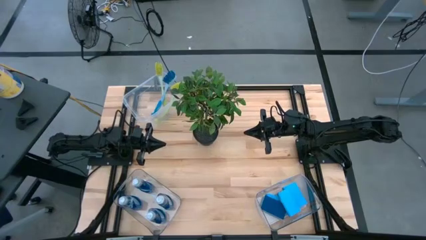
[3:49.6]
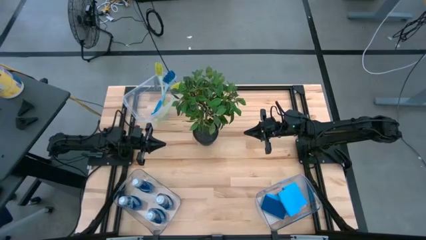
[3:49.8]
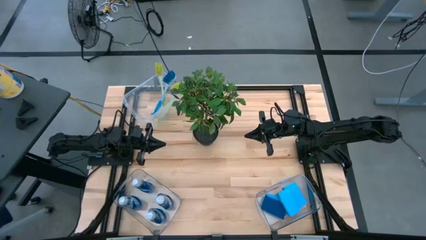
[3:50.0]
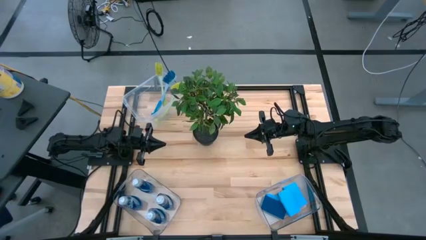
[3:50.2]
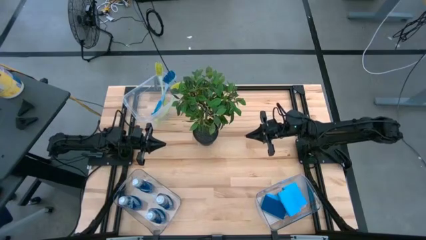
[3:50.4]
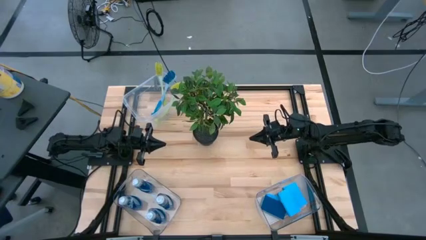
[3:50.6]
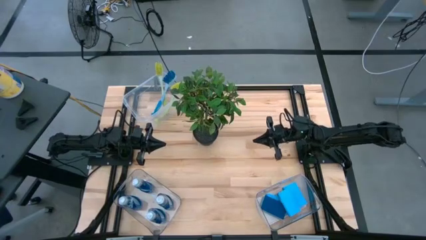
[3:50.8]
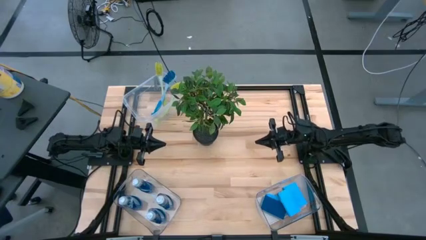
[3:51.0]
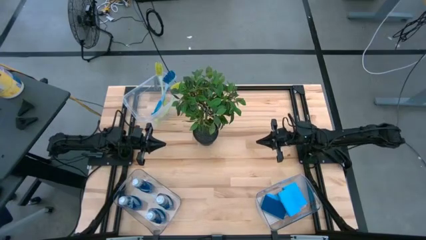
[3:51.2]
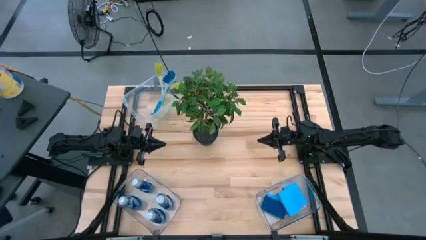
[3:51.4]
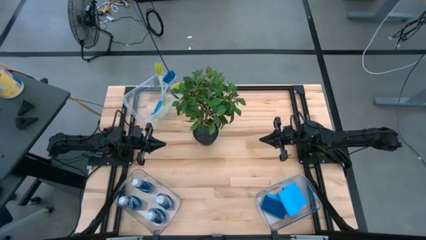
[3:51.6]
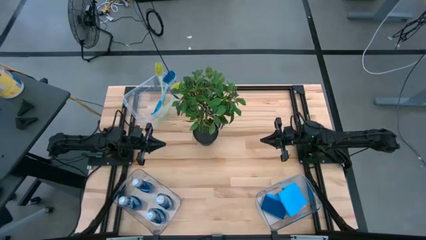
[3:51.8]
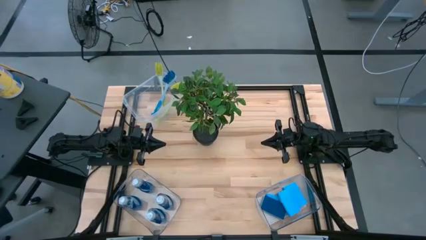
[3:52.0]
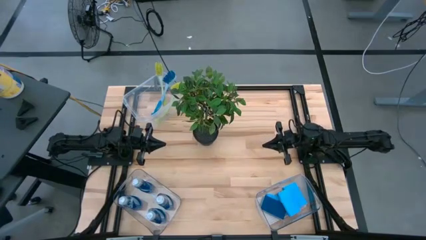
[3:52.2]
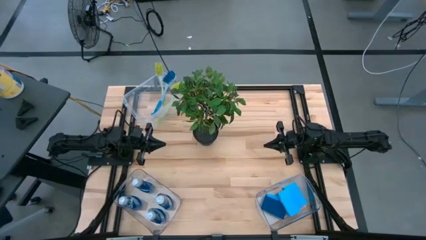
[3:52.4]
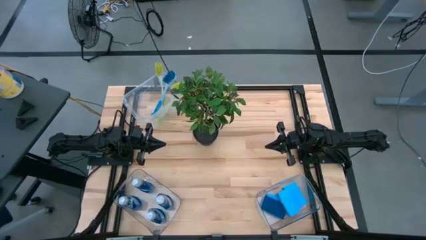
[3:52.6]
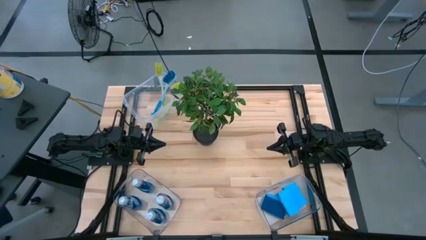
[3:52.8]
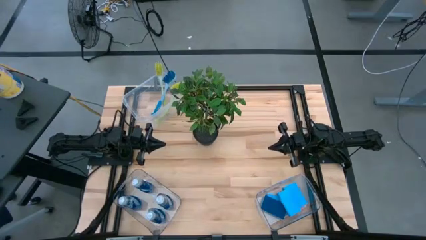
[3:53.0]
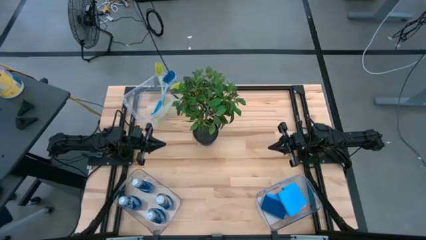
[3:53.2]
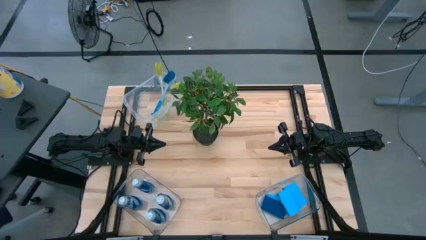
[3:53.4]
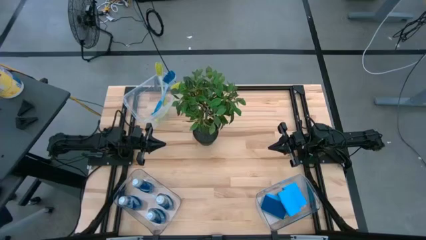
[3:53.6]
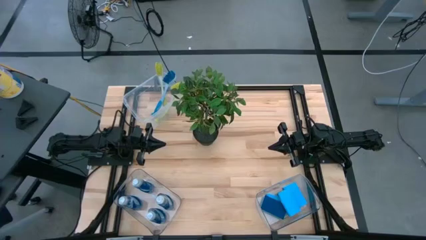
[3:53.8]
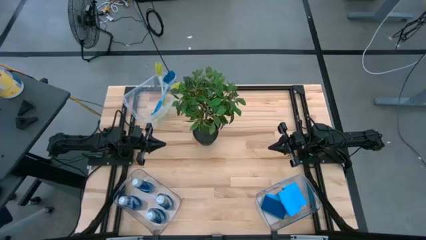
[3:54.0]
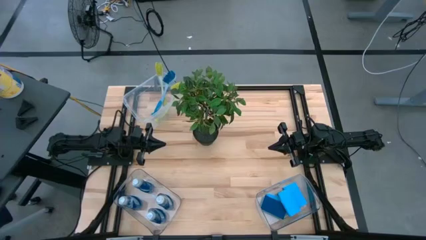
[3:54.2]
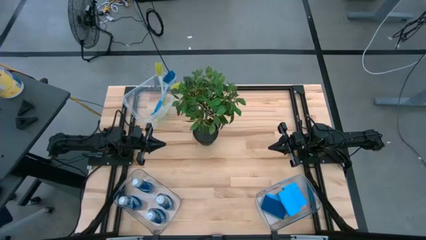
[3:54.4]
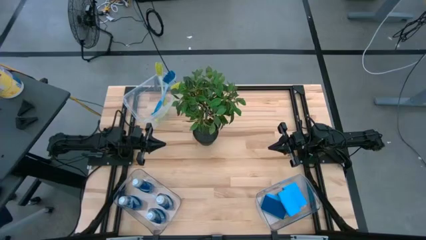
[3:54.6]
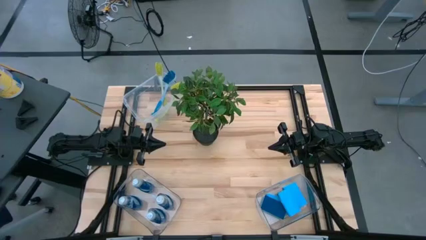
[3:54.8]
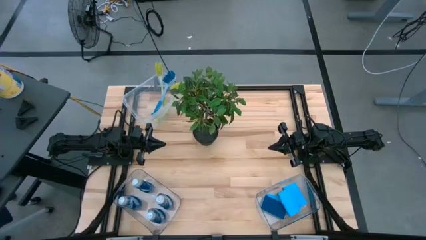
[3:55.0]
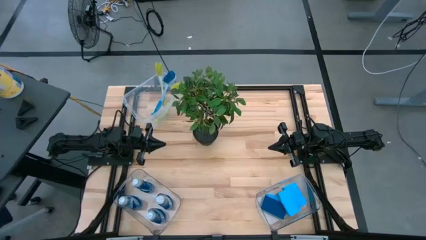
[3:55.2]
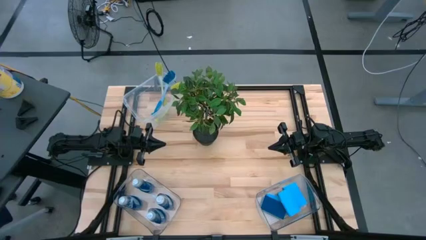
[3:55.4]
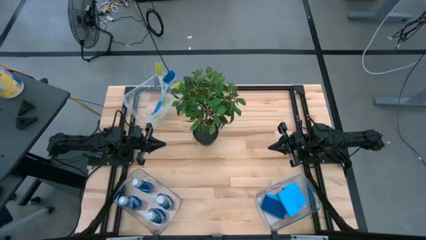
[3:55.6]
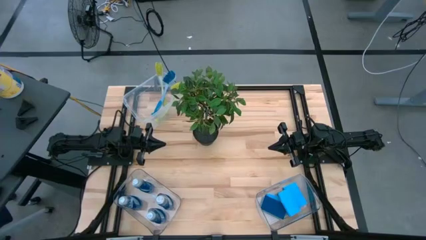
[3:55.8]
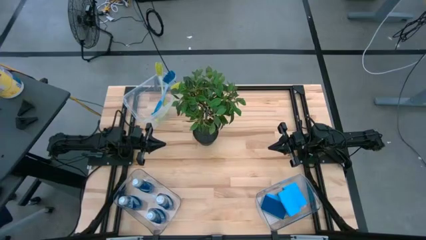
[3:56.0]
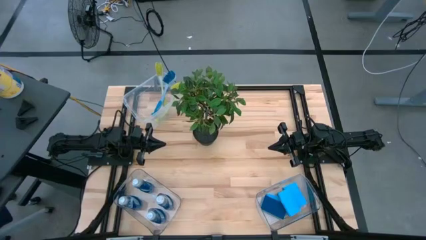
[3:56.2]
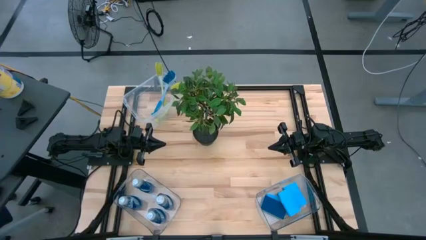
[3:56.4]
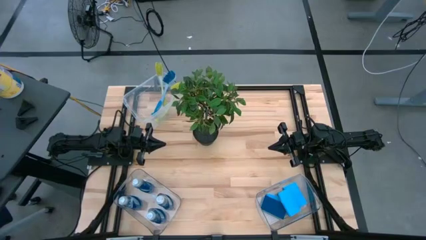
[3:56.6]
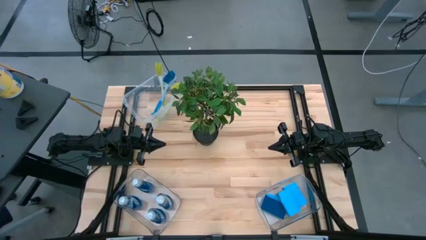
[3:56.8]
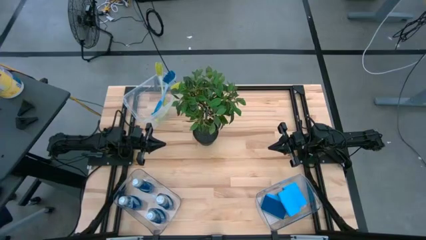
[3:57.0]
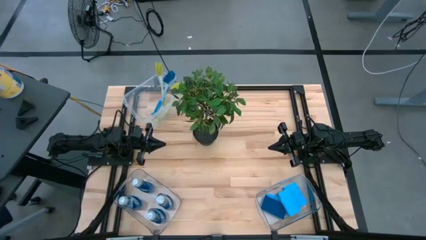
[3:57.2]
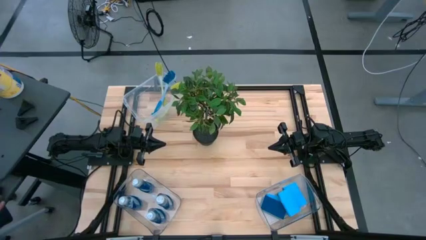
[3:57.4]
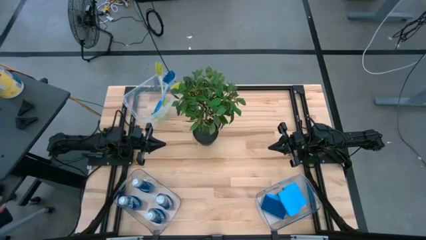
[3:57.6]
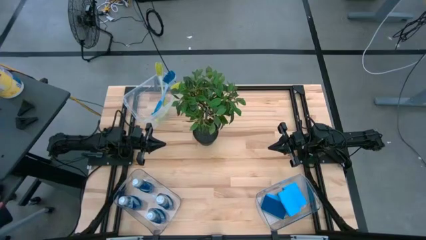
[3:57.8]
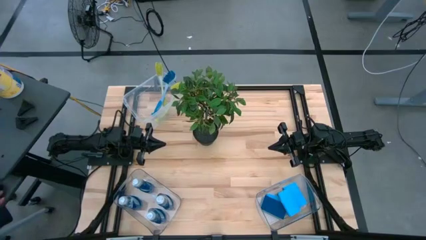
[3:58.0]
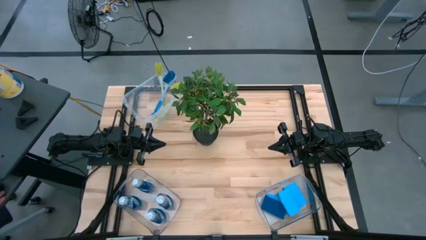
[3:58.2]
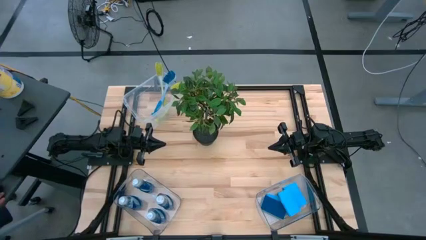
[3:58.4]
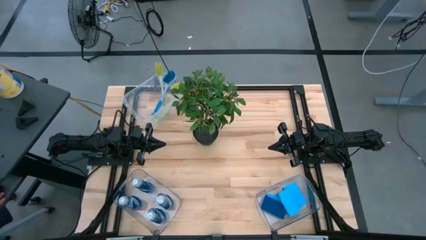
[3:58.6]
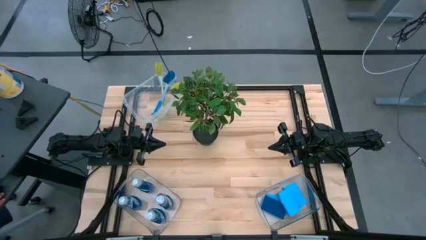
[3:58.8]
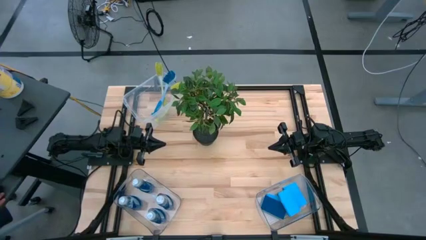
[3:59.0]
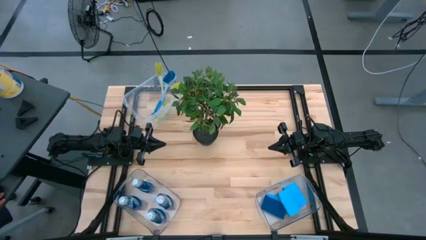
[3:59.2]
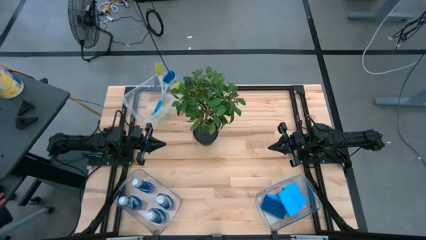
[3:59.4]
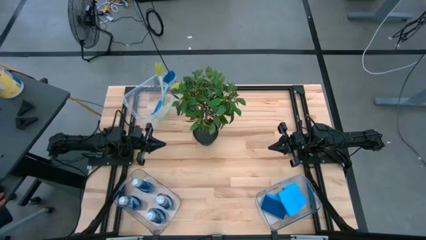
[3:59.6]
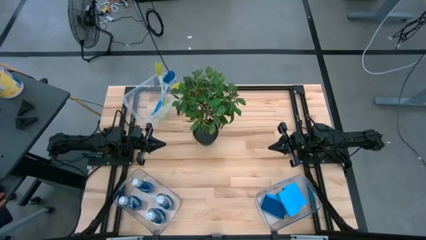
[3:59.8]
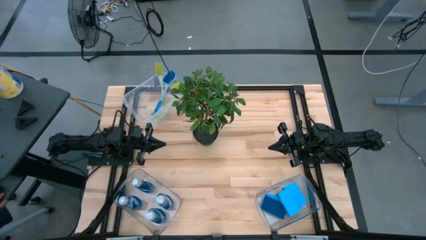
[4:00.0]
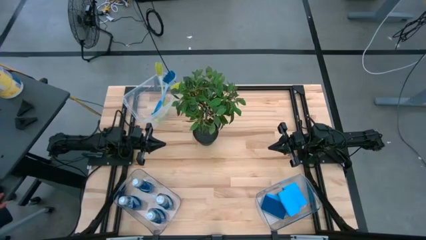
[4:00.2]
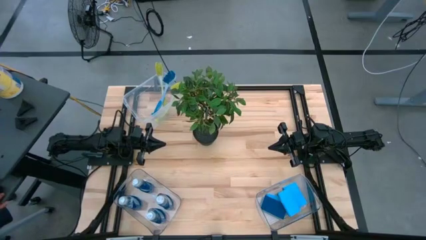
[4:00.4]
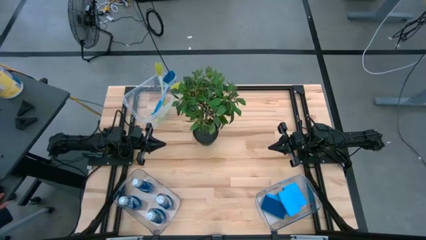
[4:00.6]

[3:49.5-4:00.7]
Task: Pick & Place Kitchen Sink Supplies
Return to Home Position

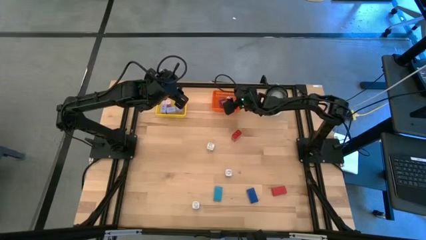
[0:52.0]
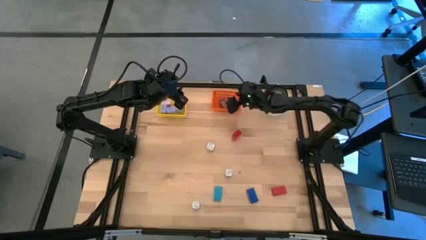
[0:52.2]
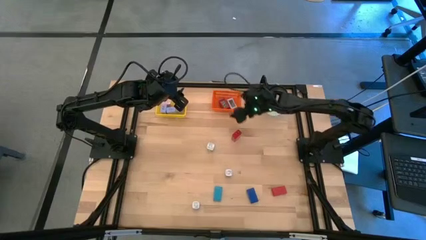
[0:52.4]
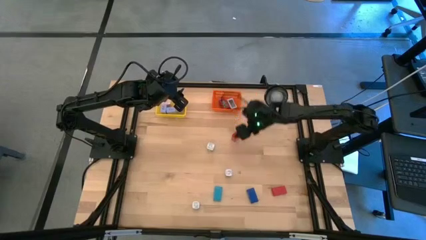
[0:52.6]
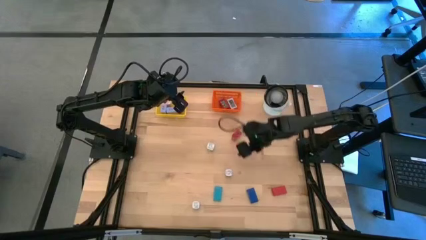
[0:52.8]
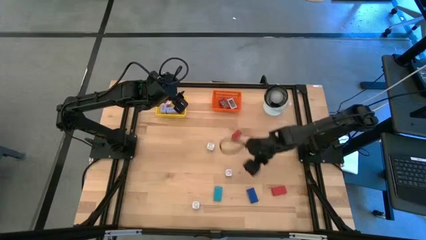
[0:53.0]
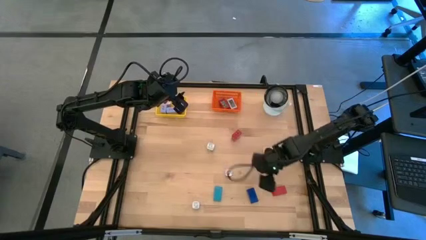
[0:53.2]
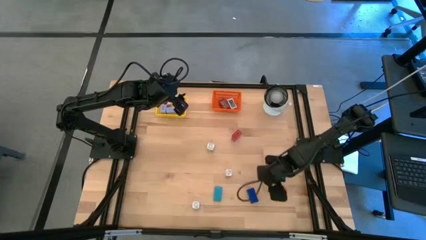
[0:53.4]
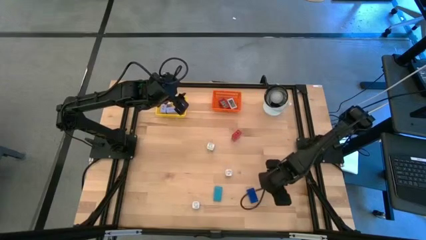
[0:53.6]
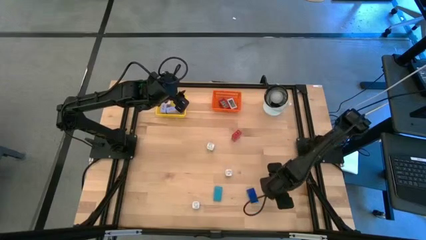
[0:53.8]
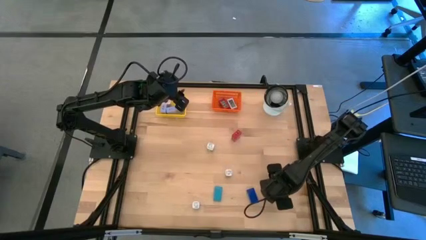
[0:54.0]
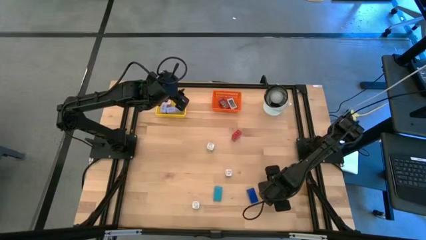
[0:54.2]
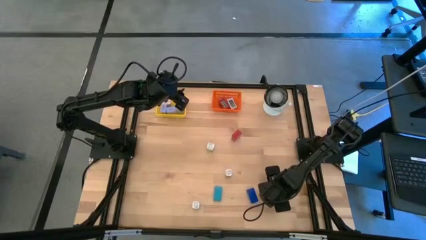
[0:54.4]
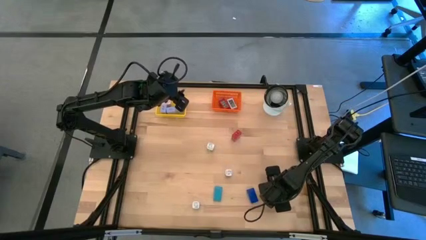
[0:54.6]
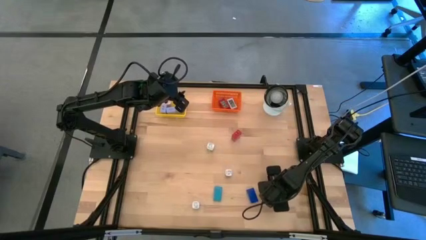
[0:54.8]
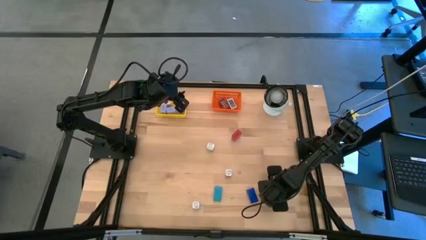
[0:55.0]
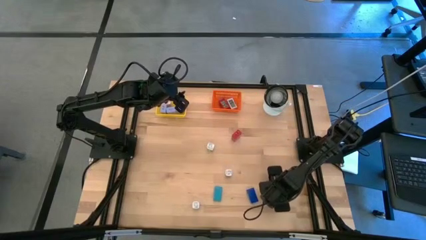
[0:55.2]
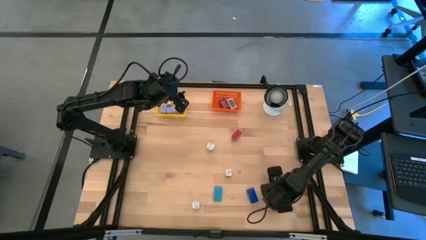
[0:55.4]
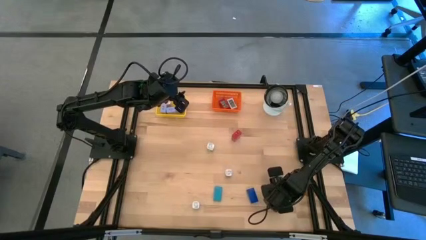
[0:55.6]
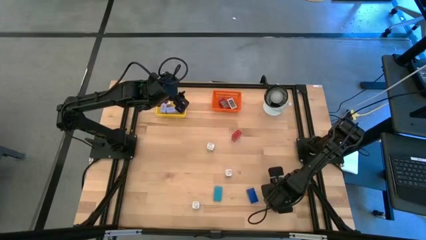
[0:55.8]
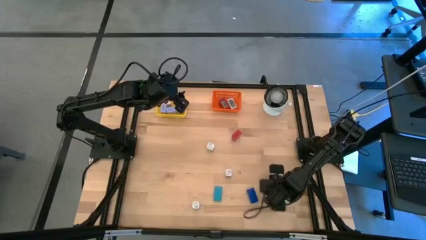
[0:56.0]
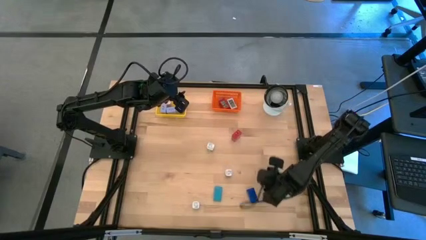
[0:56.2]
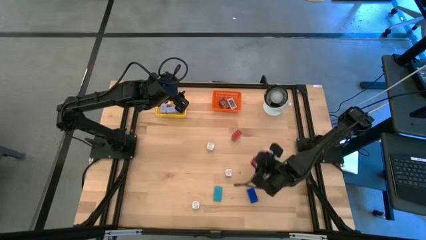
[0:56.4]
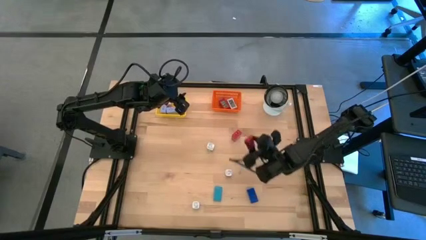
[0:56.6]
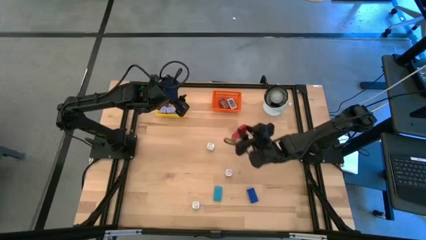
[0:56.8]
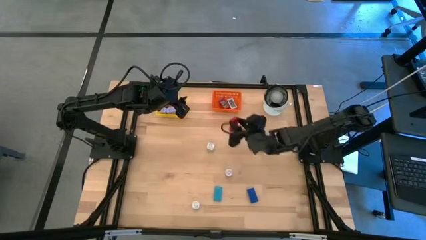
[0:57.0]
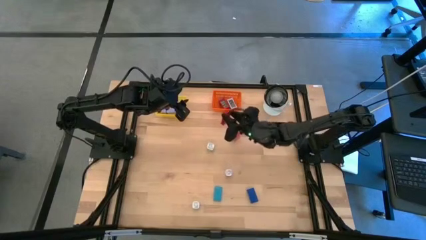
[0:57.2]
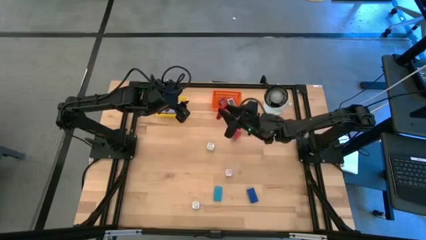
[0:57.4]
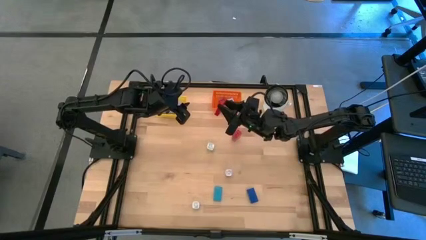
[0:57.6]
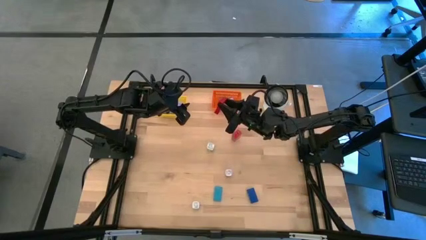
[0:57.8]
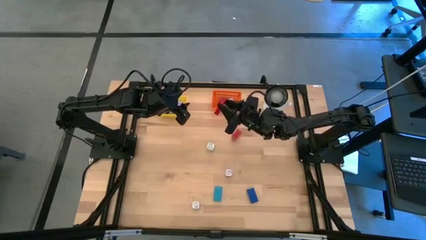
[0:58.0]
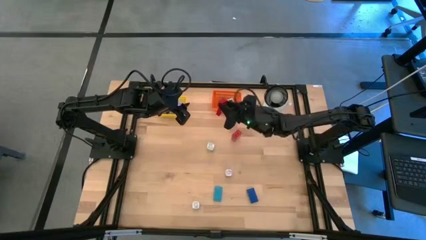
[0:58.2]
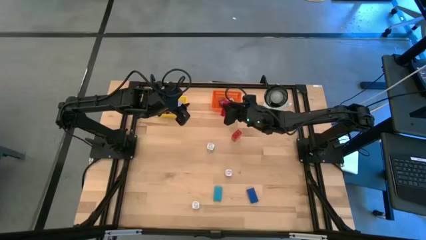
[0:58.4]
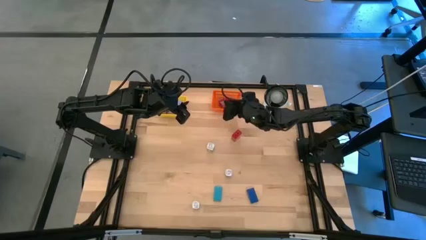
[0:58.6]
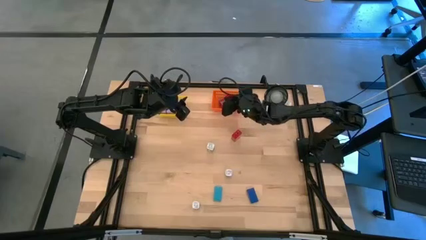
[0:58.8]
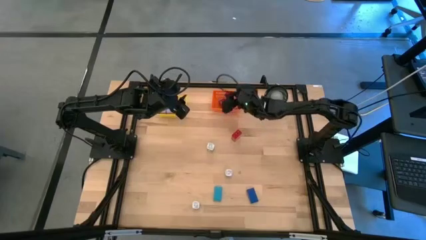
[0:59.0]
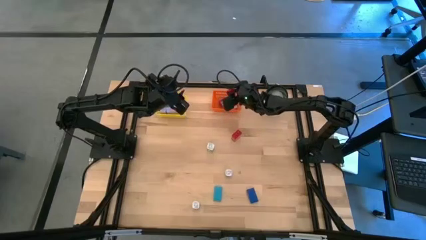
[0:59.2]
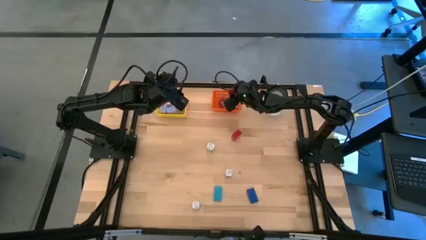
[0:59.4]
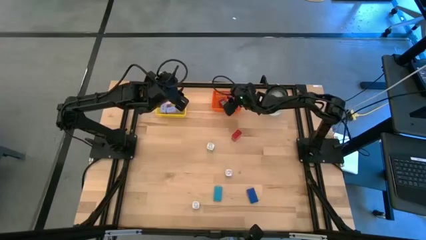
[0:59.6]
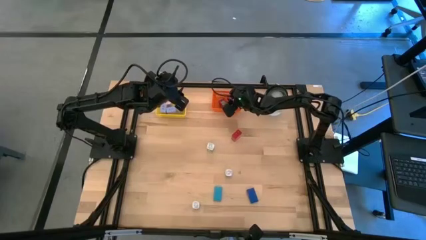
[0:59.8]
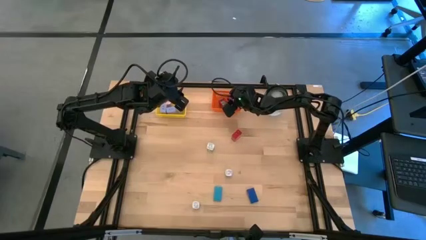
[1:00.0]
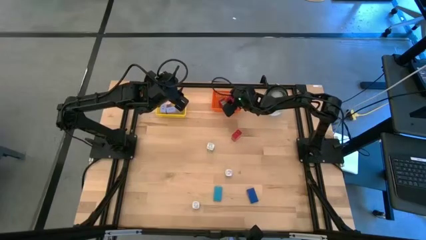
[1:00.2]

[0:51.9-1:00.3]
Task: Pick & Place Office items
Put the red digital timer into the orange bin
